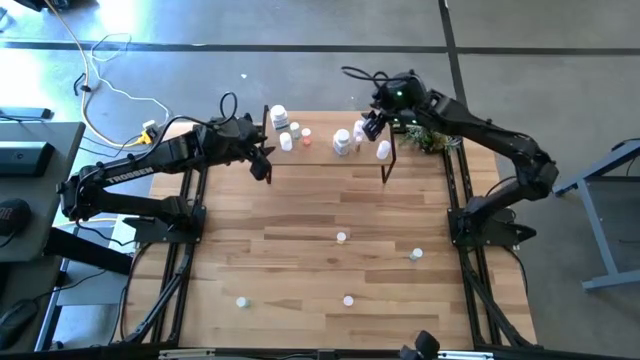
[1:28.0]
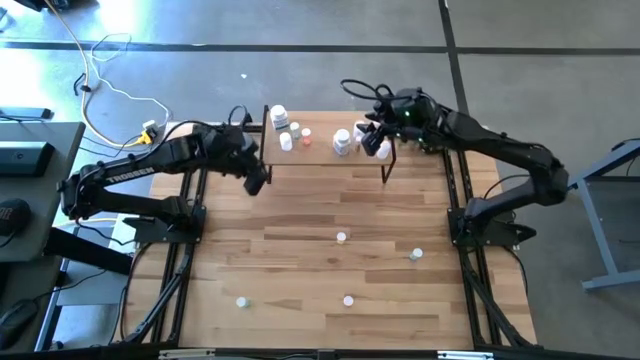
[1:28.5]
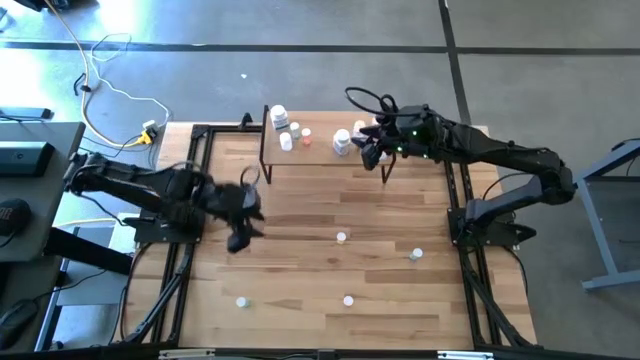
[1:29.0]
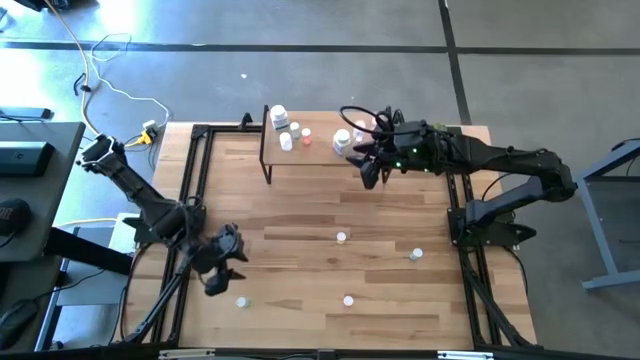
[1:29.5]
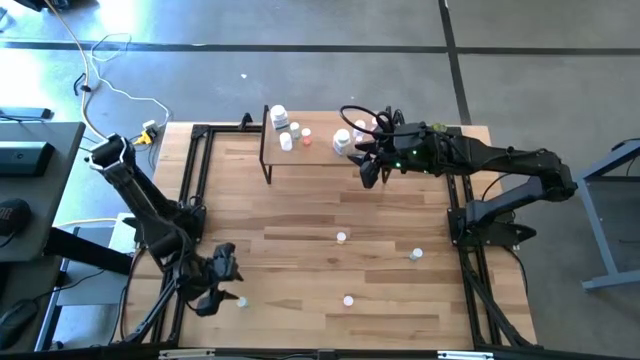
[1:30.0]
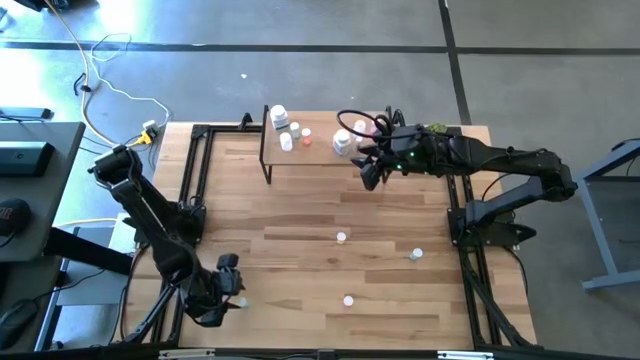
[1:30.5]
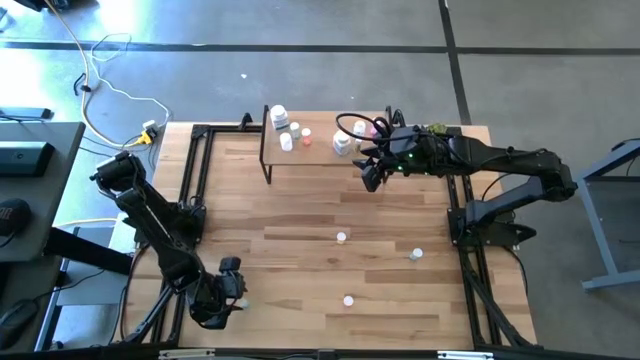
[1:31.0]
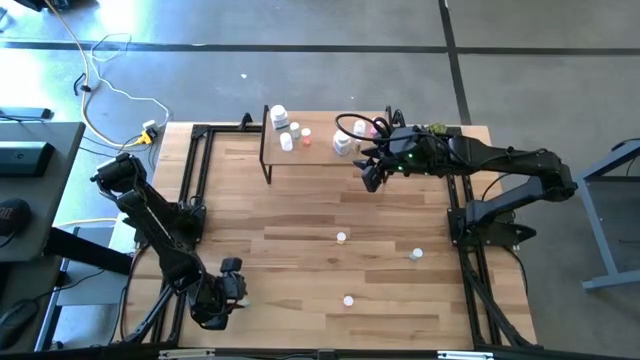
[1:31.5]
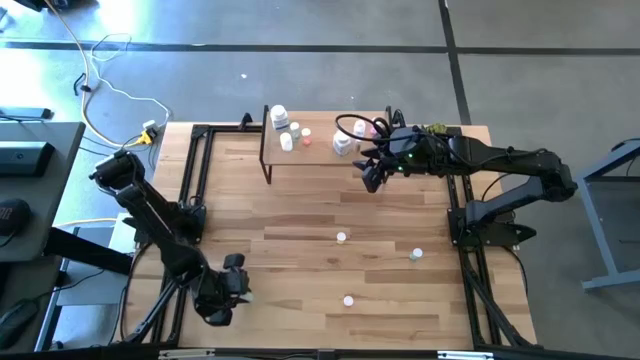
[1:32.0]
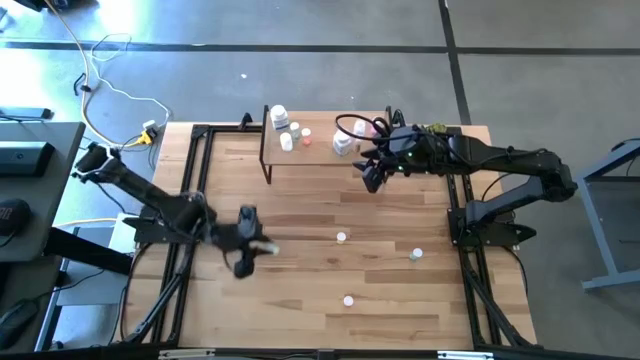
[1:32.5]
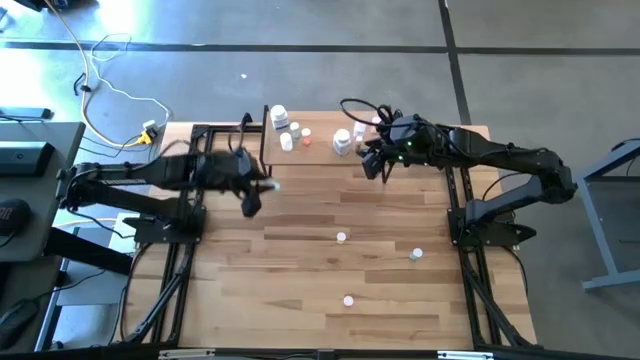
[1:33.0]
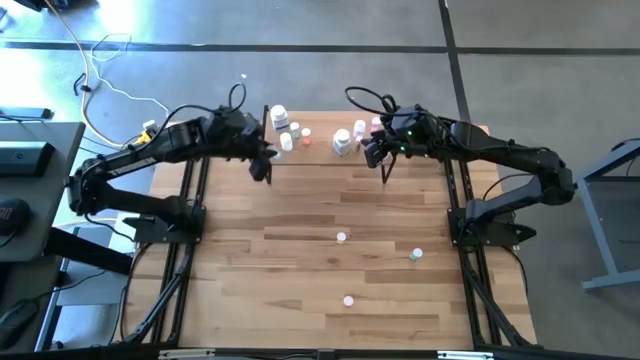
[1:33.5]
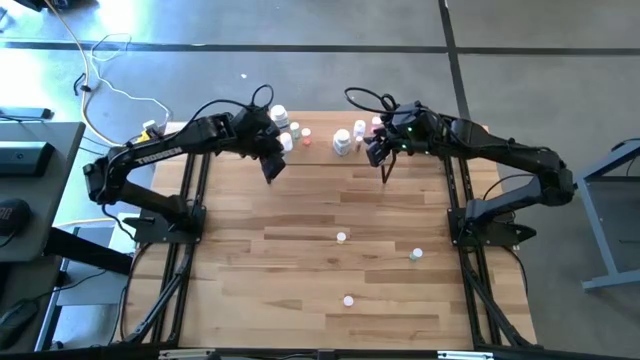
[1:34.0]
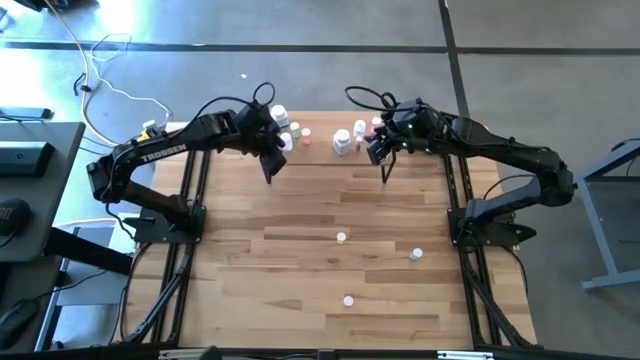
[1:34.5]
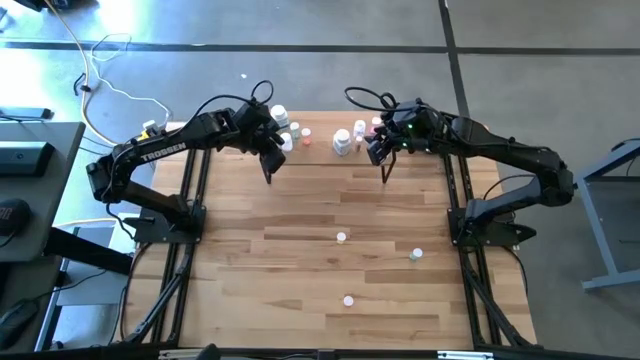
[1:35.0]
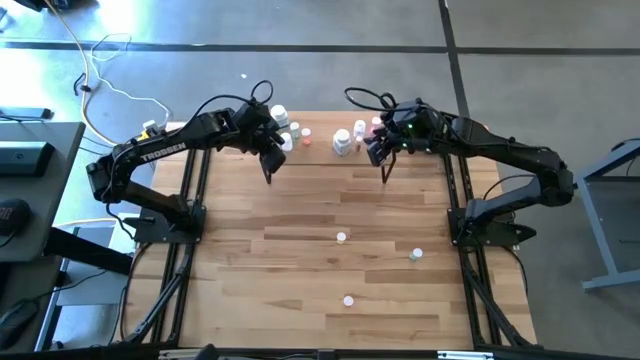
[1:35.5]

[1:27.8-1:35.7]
Task: Pick and place medicine bottles onto shelf by color
Put the left blue pill bottle on the shelf

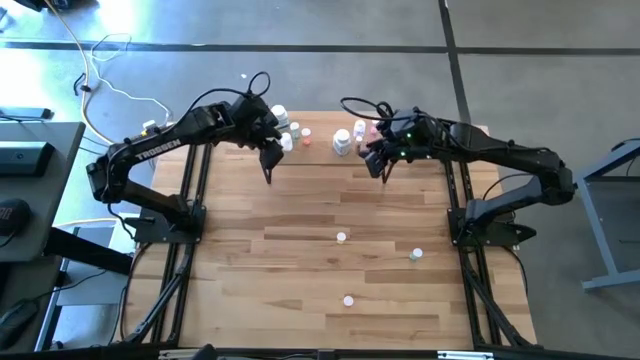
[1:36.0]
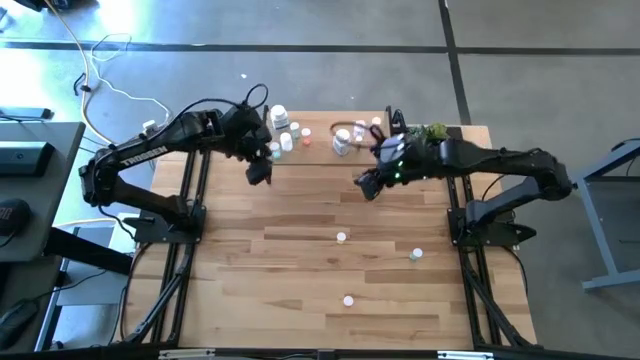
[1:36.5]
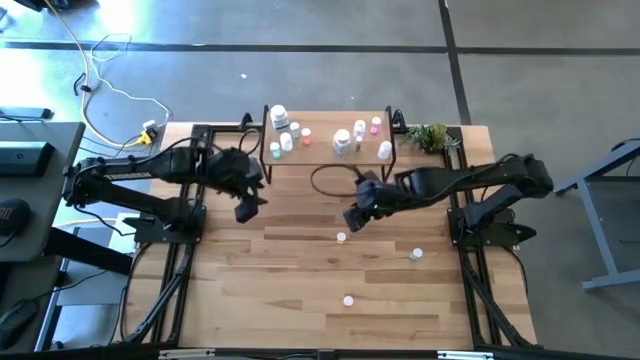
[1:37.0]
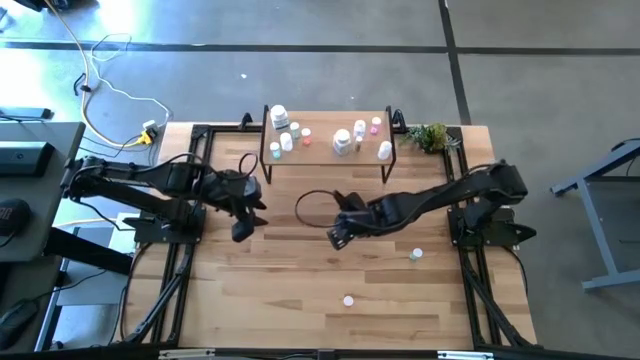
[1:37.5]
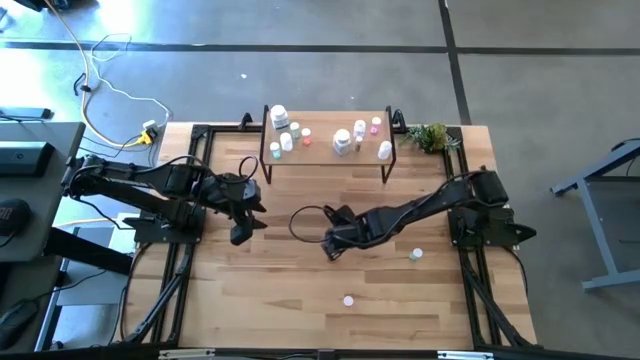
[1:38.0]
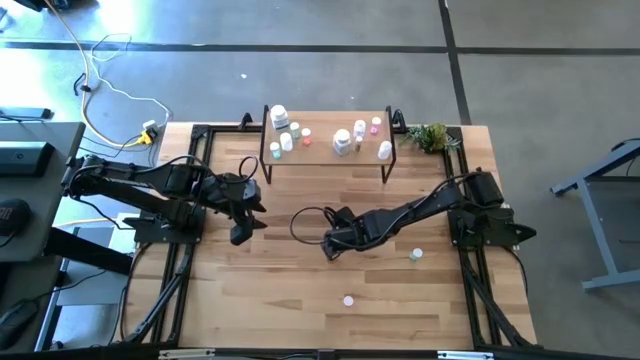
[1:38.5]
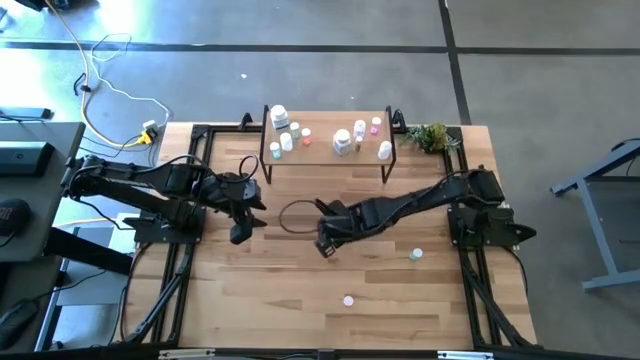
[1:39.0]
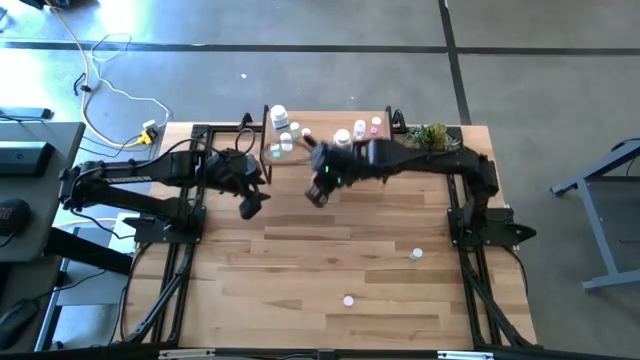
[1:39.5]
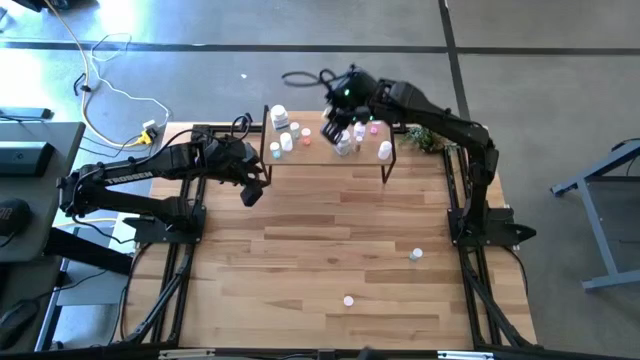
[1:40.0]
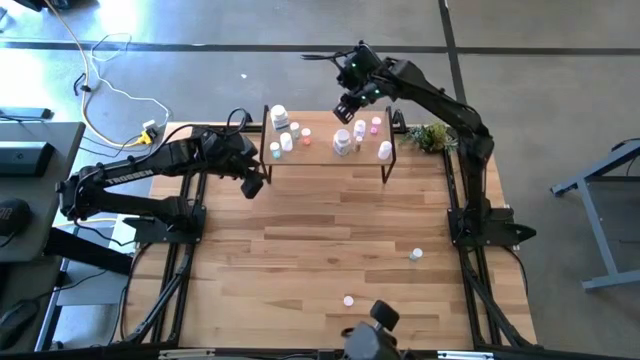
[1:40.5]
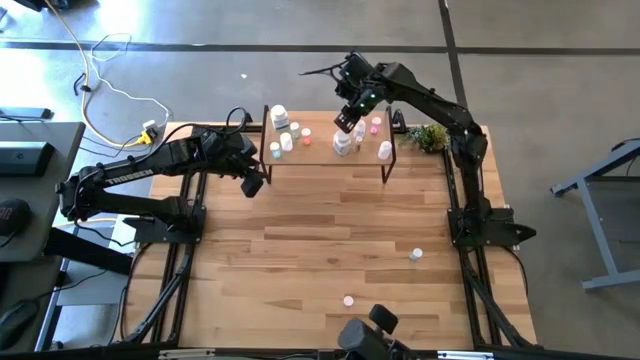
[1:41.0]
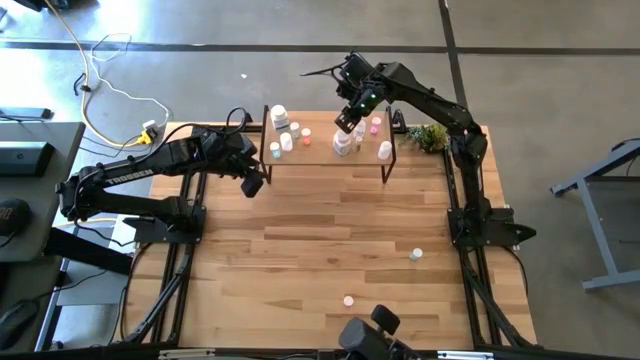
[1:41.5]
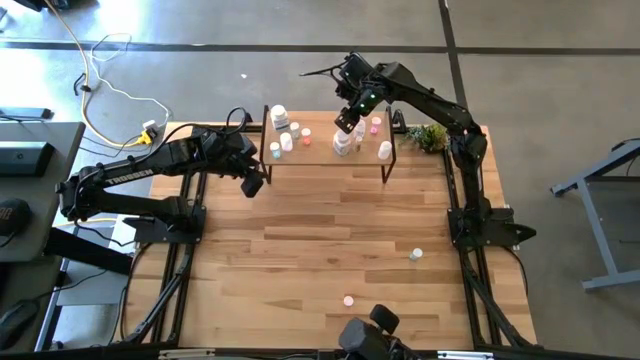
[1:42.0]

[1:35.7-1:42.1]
Put the yellow pill bottle on the shelf

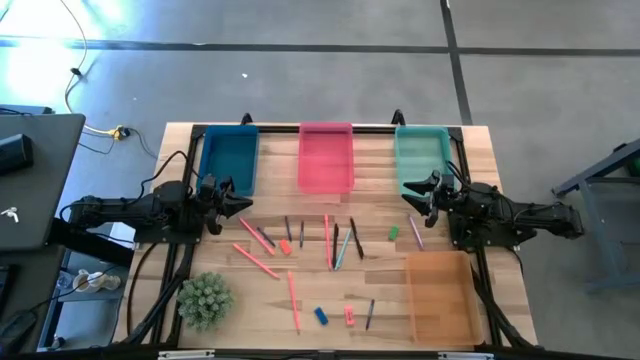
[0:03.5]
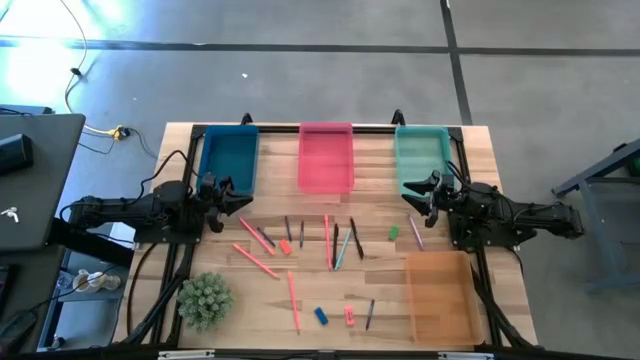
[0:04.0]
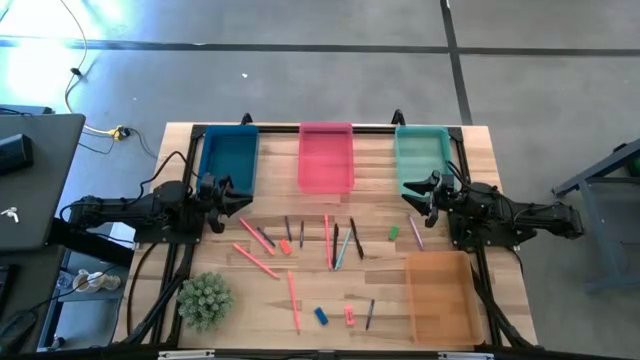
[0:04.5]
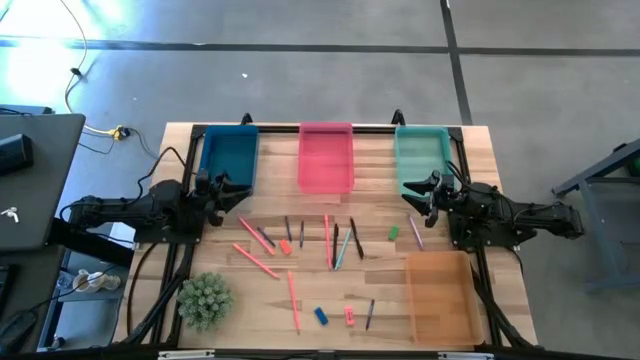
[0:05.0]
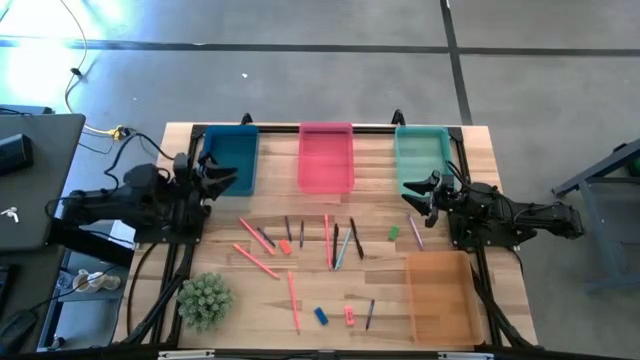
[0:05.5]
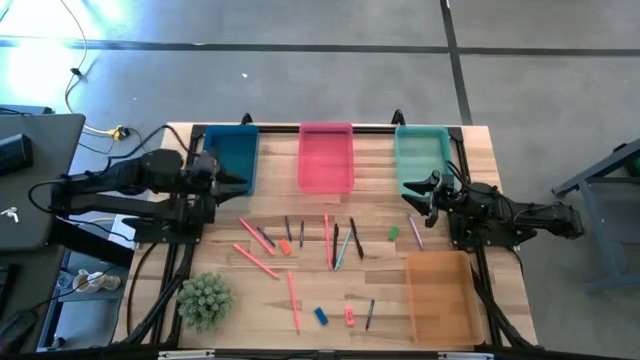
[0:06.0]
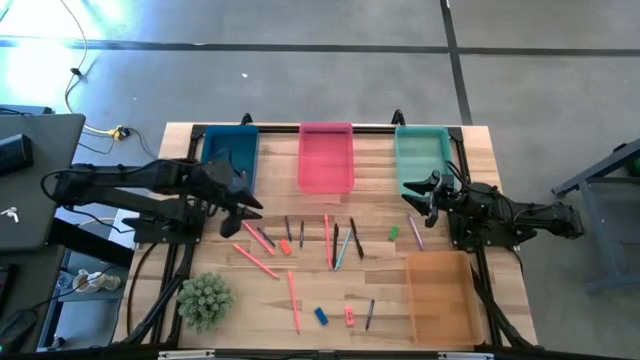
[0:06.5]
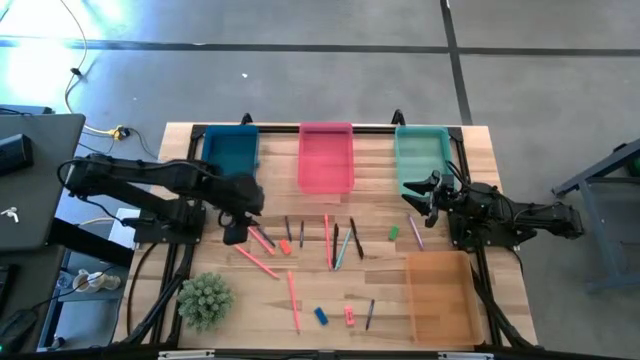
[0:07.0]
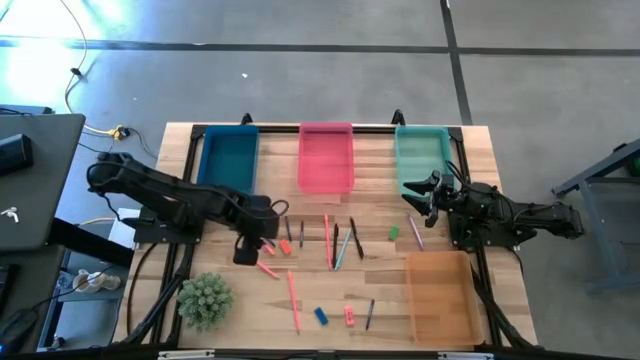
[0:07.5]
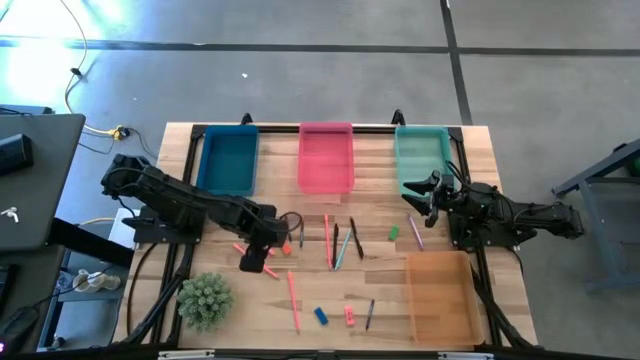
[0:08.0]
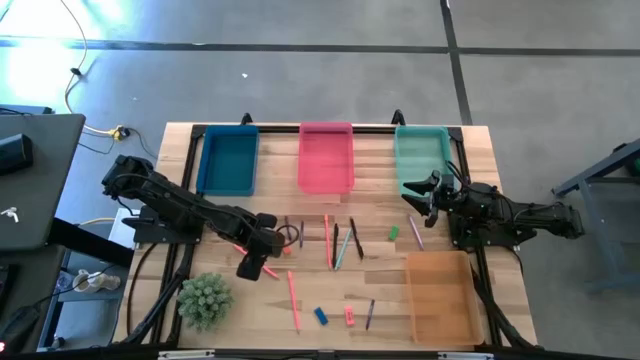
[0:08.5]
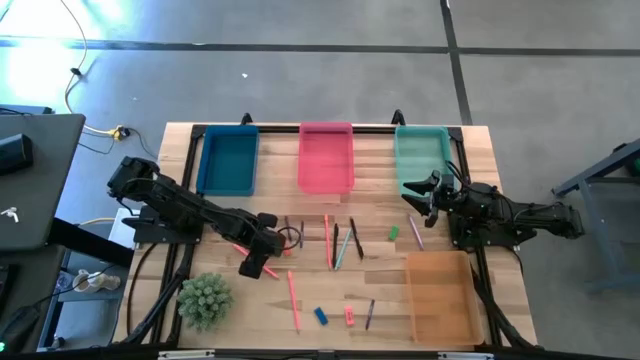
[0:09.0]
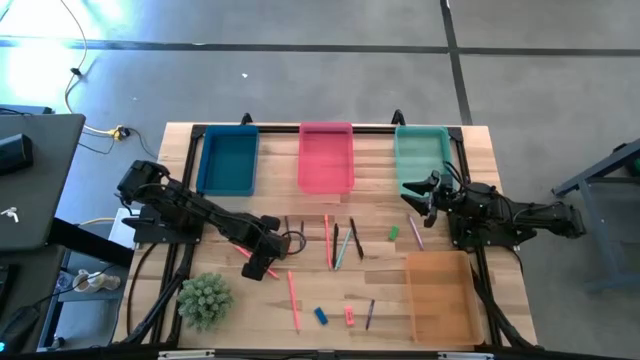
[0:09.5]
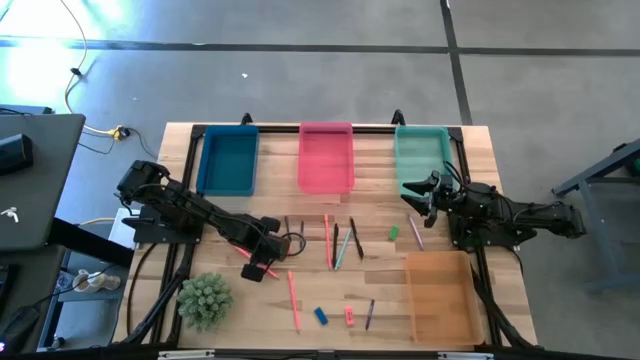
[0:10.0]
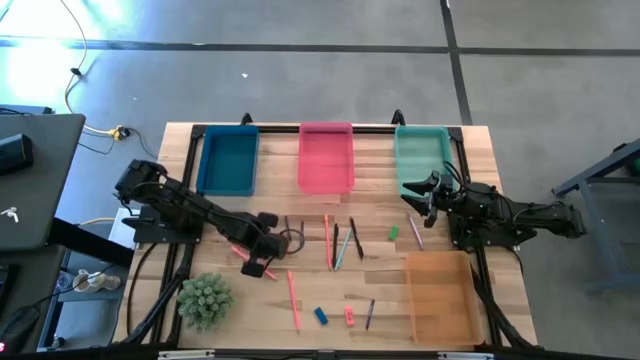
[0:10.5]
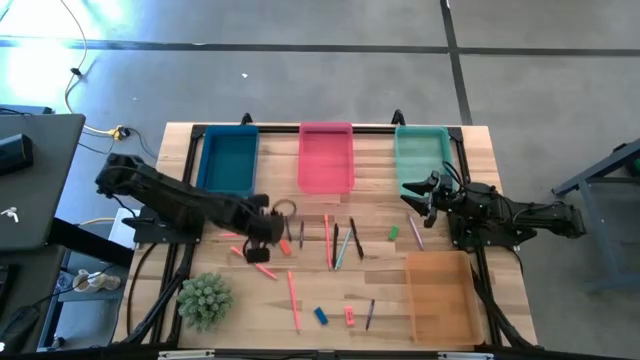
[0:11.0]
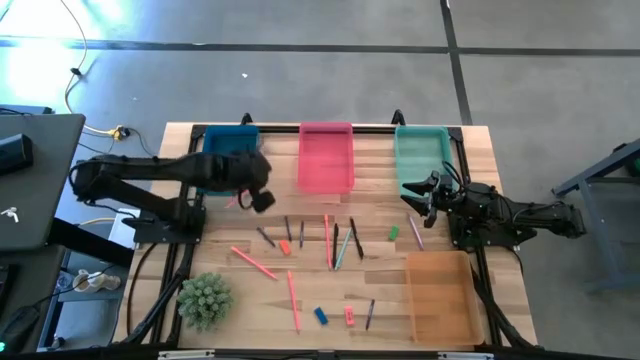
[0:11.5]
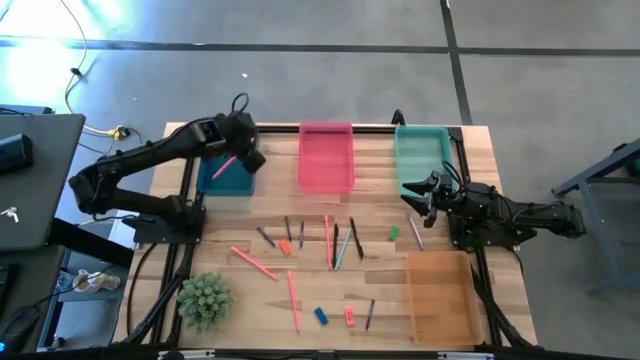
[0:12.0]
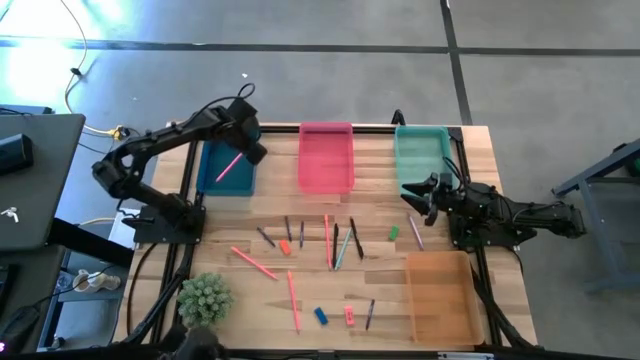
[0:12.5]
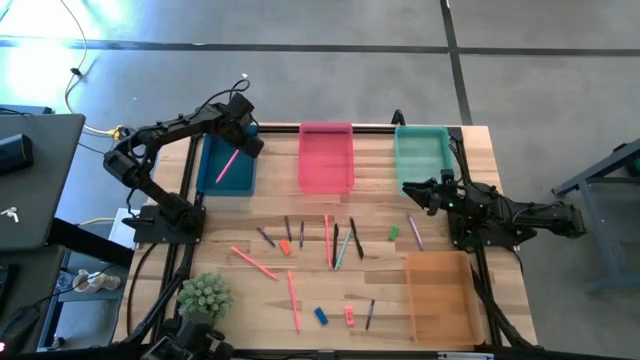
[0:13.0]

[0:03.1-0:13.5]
Task: Sort crayons/erasers/pens/pencils in bins
Put the pink pencil into the blue bin
